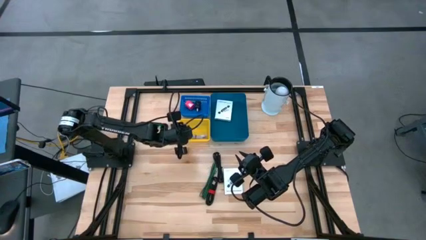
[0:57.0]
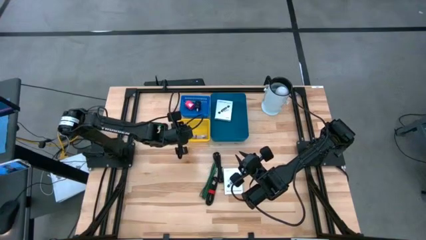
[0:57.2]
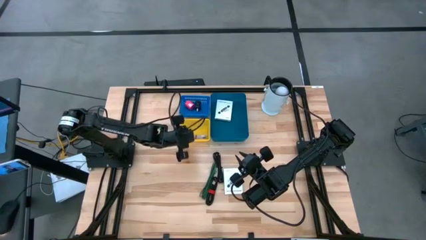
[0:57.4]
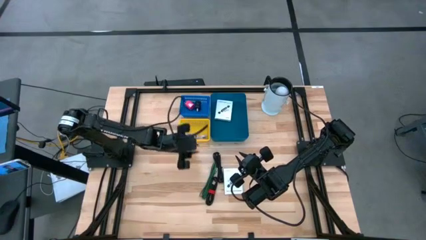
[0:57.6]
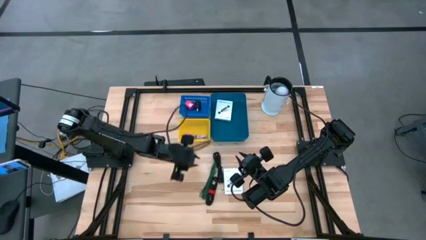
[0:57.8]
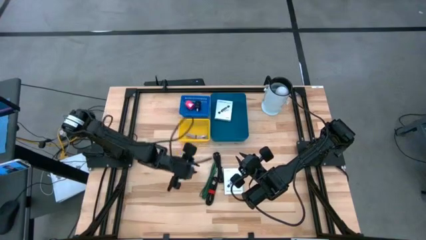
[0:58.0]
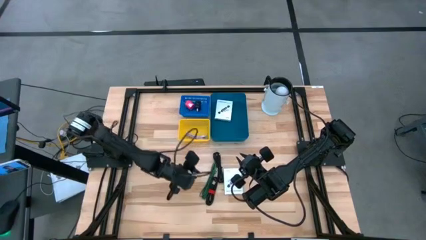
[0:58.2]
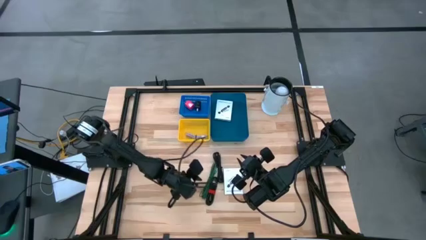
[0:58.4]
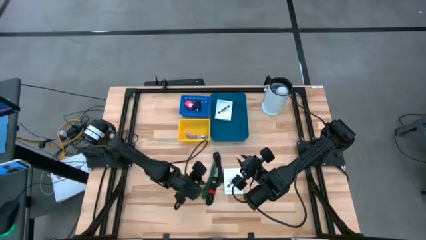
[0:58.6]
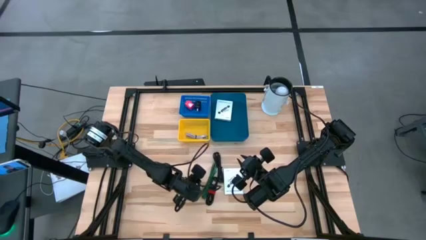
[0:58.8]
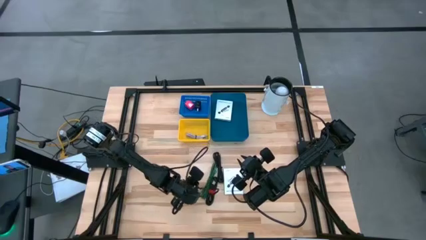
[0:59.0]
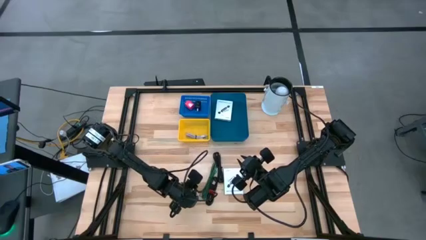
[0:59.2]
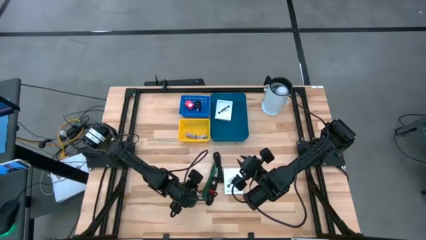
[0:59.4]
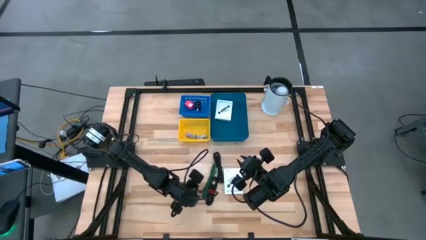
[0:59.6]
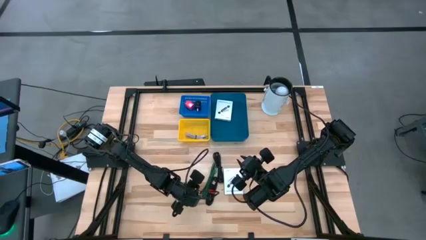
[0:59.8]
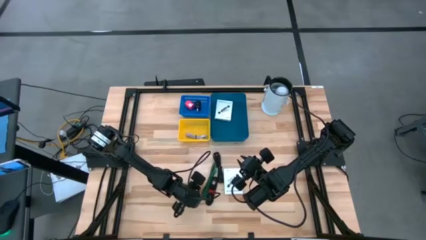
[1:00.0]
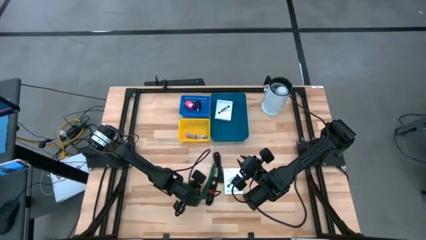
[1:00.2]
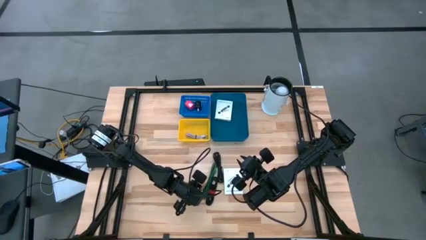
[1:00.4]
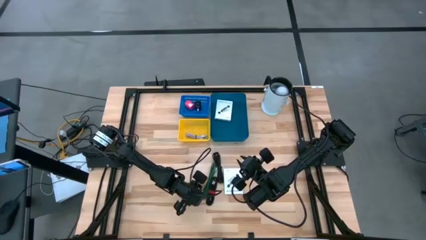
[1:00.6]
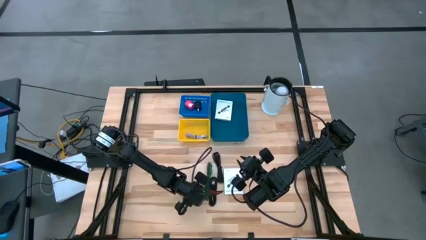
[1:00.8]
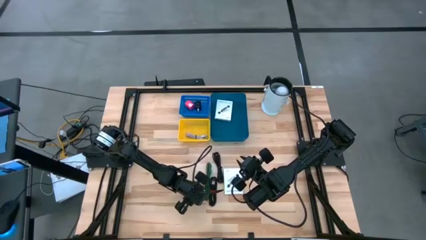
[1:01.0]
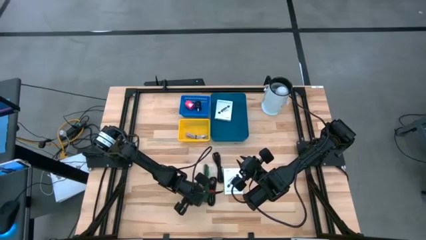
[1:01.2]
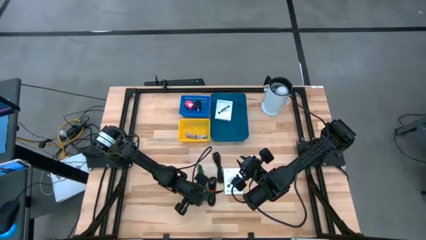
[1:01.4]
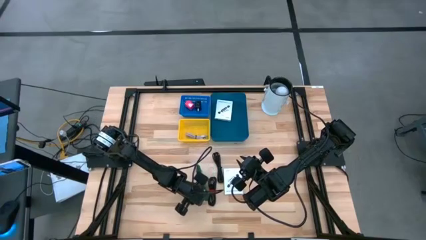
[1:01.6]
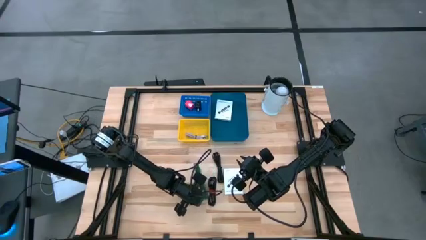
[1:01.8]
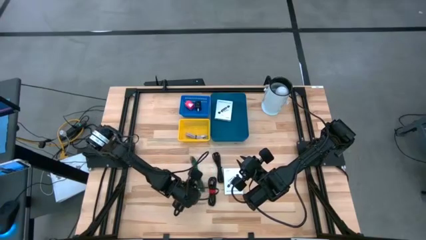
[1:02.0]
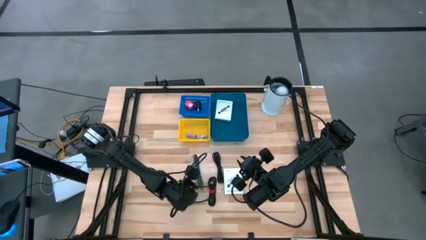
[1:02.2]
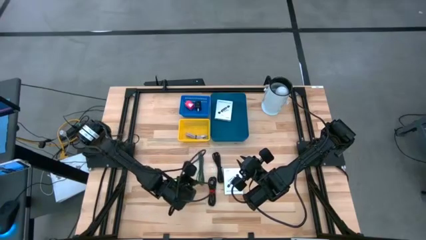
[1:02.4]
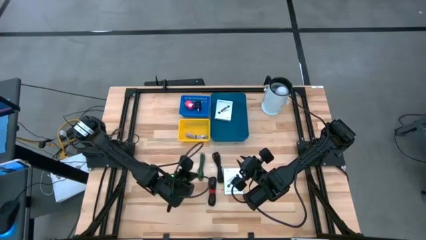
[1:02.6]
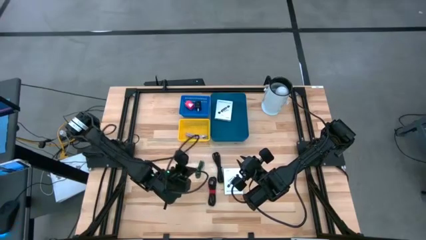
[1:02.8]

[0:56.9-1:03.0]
Task: Pick and place items into bin
Put the green USB cable into the yellow basket

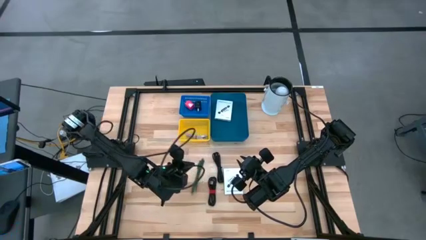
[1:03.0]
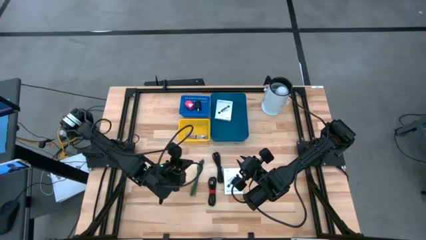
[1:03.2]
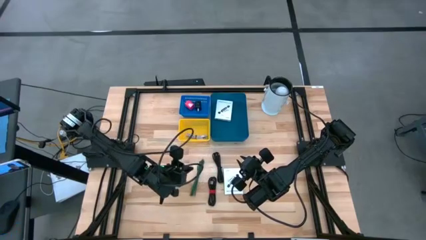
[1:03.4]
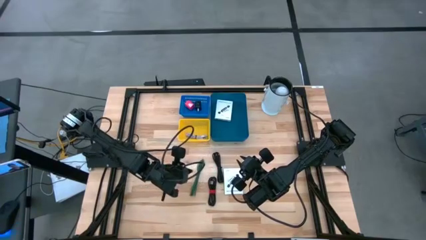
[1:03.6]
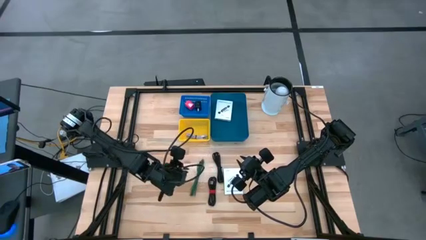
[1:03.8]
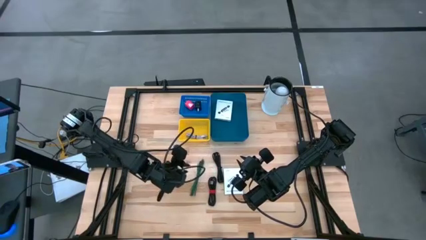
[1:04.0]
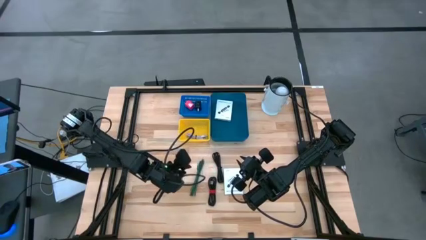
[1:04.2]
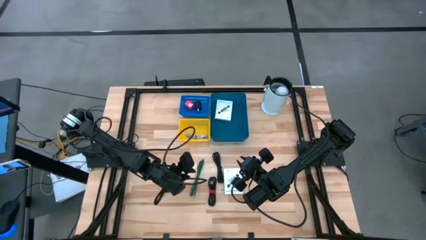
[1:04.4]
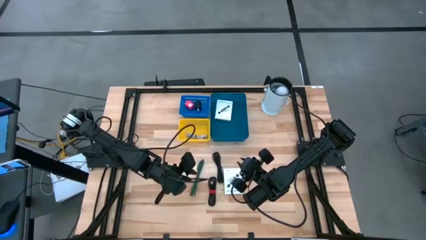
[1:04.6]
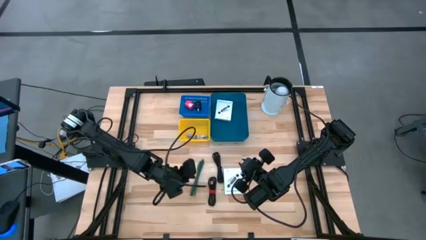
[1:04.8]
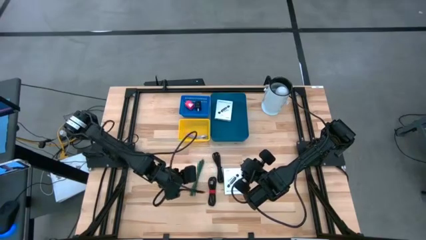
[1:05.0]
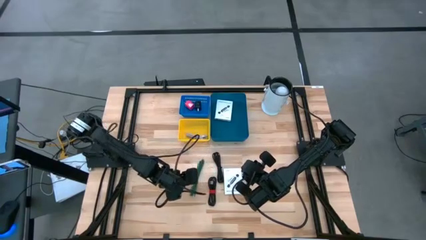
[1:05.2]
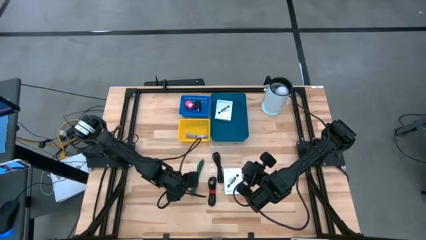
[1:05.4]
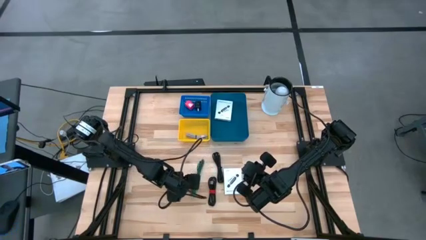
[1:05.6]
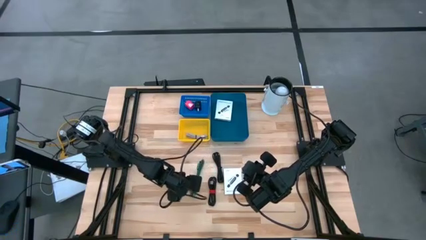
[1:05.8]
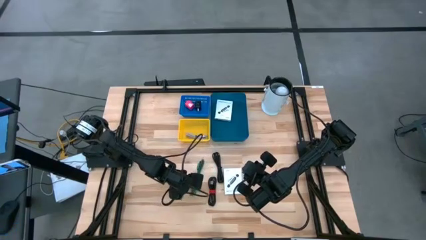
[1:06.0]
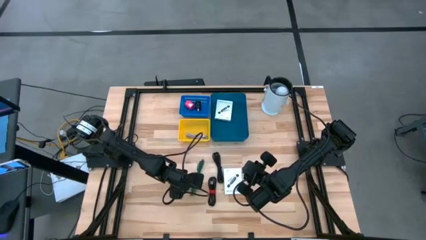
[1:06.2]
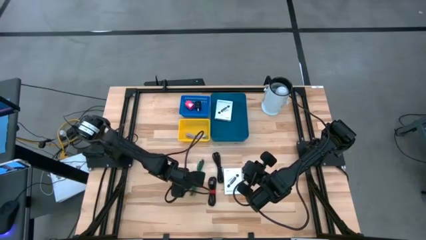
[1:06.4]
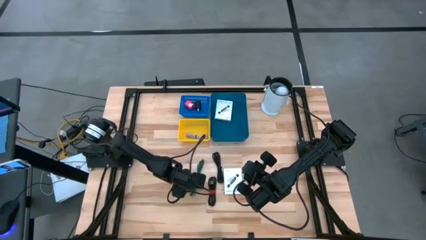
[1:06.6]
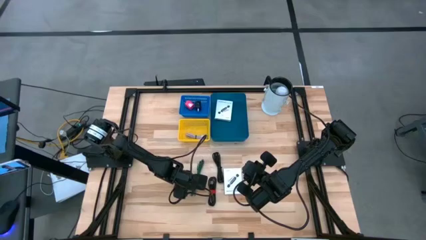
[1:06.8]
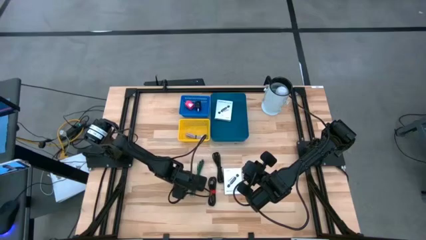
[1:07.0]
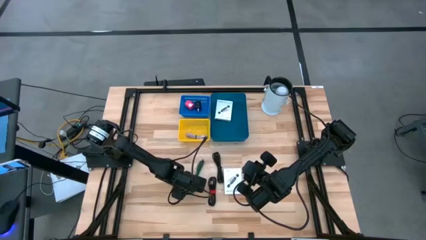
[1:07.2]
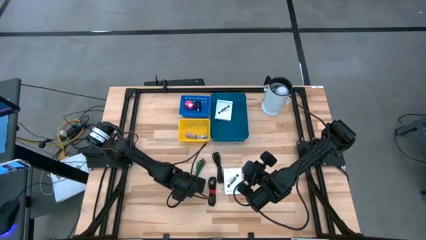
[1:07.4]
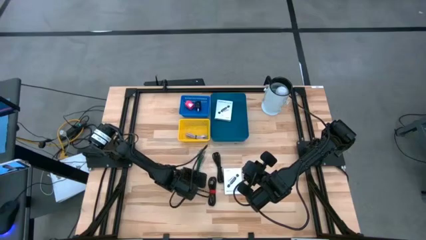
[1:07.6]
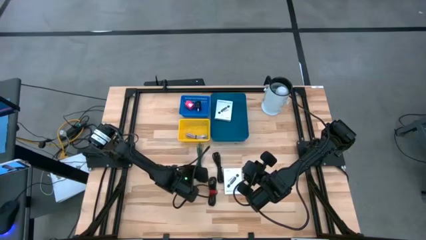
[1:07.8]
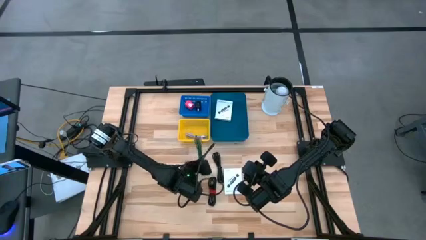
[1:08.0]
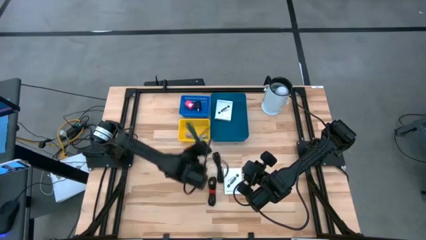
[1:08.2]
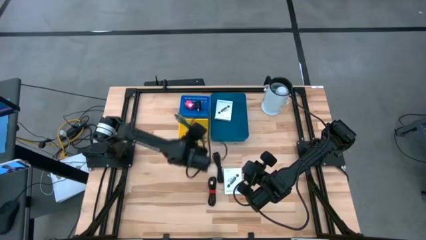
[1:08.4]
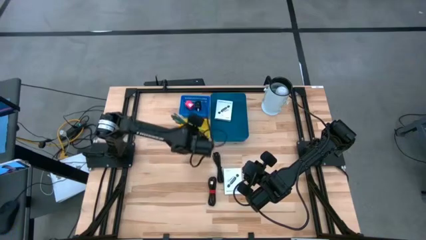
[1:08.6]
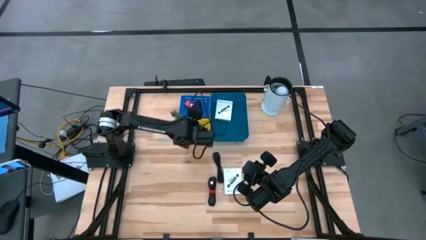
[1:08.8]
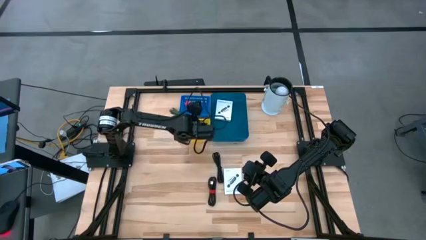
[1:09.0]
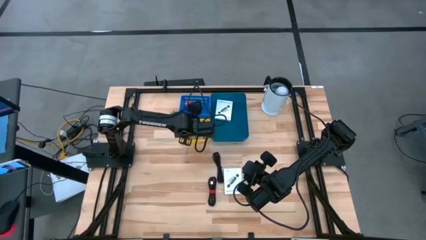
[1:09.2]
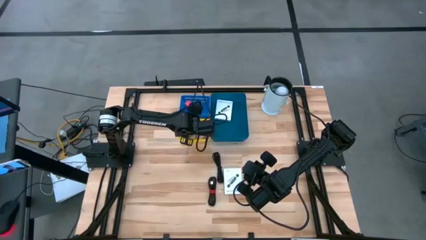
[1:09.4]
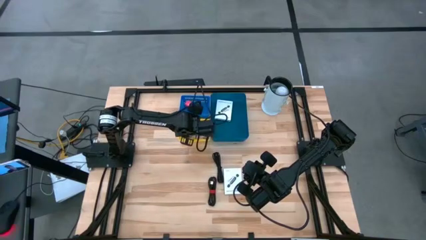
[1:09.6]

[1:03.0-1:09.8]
Put the green USB cable into the yellow basket

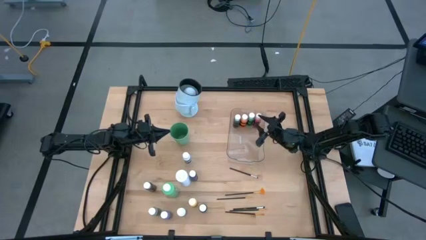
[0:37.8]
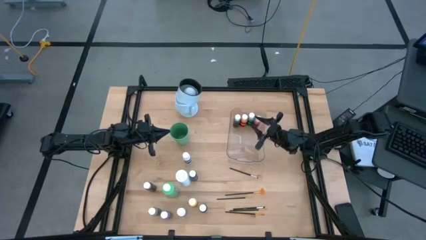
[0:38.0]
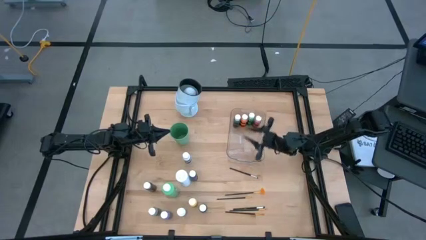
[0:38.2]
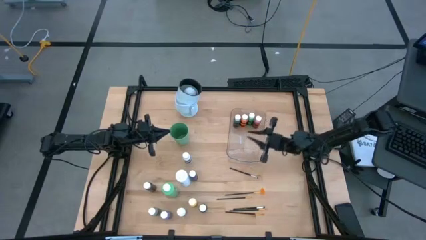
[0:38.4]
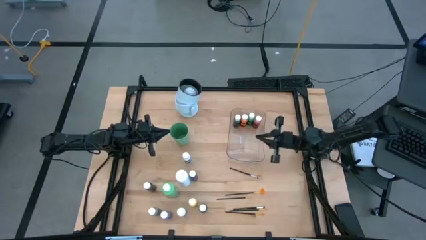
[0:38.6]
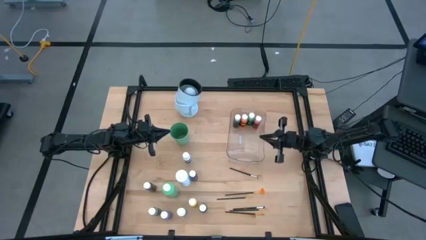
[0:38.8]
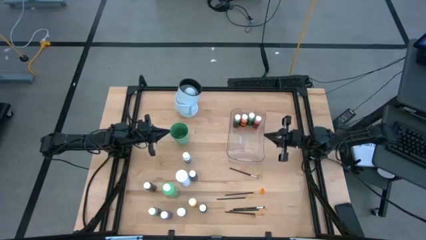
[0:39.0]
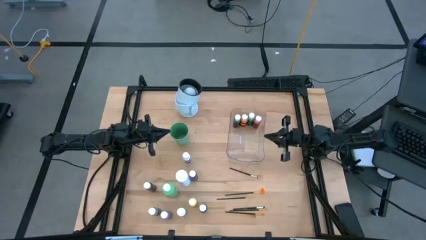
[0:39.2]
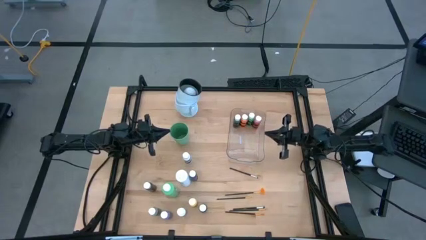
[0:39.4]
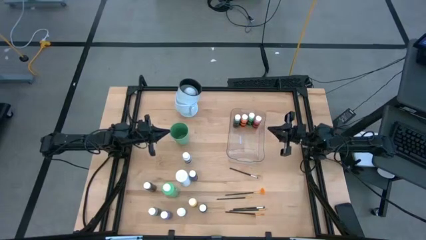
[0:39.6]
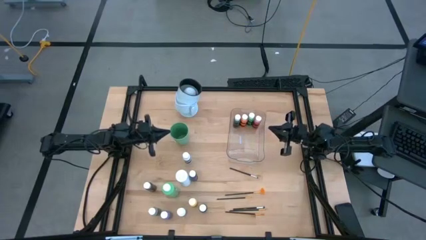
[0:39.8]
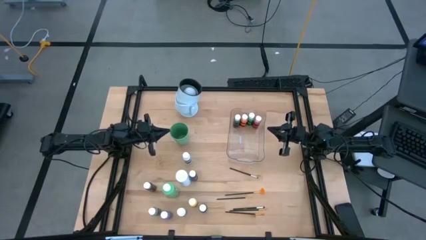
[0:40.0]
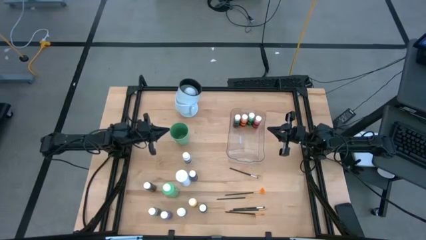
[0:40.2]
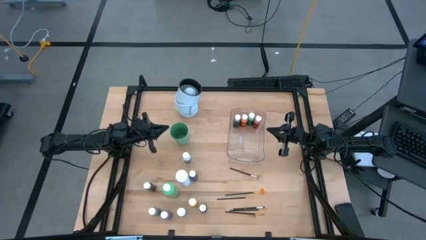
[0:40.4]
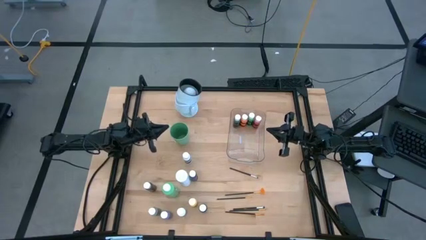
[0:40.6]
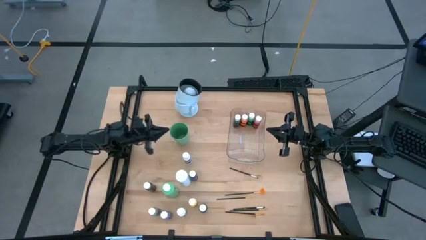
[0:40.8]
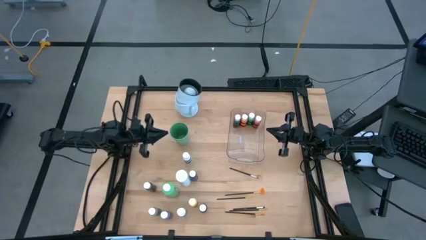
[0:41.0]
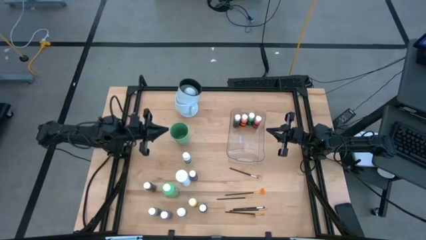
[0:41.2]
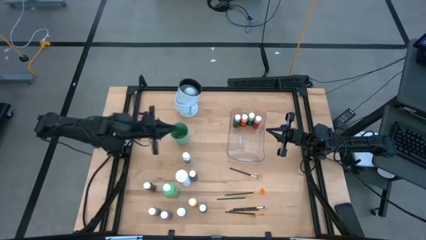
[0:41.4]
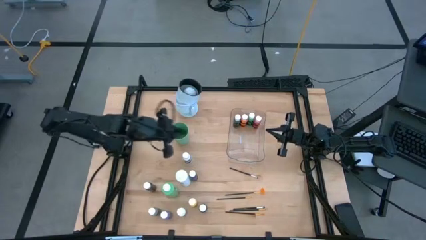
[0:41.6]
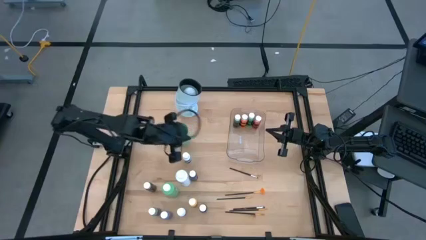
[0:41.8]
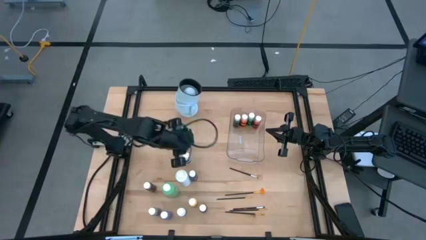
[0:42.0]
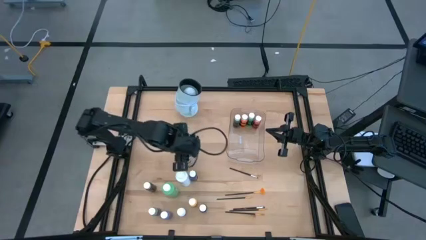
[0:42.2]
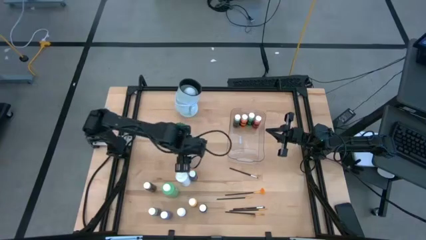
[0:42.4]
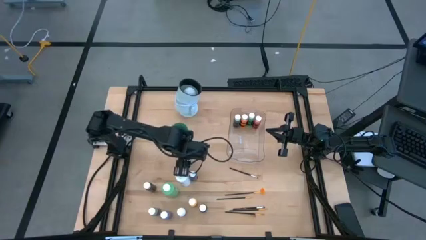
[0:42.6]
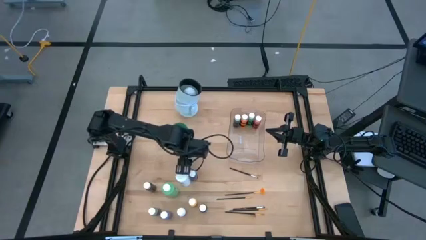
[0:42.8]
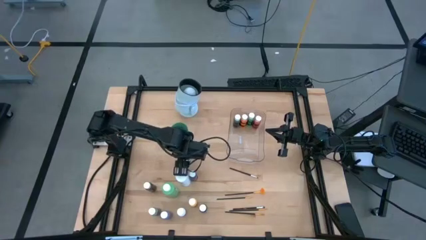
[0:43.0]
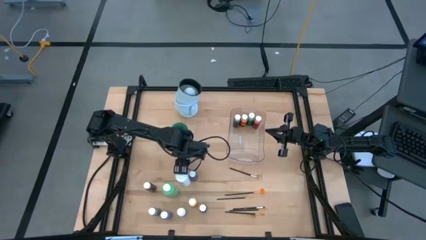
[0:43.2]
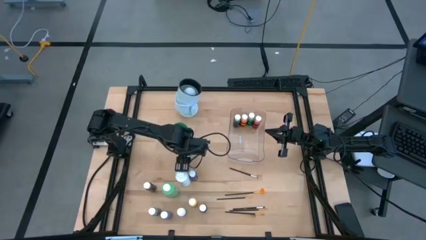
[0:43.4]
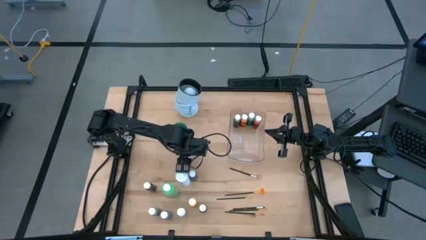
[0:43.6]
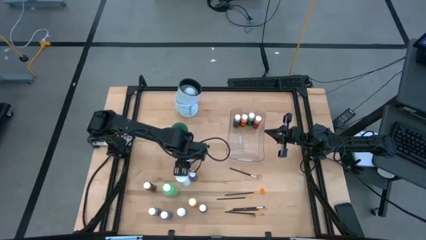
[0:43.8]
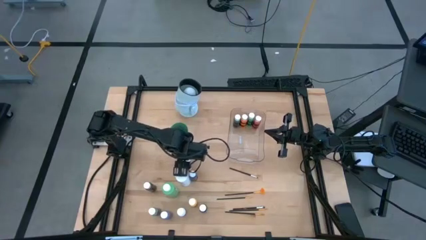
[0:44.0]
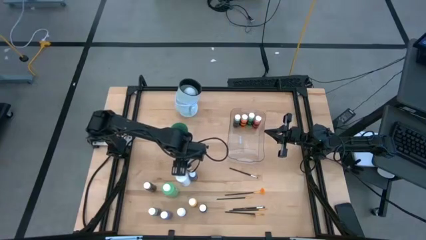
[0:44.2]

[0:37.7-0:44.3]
Task: Pick & Place Paint Supplies
Put the white and black paint bottle into the transparent bin
